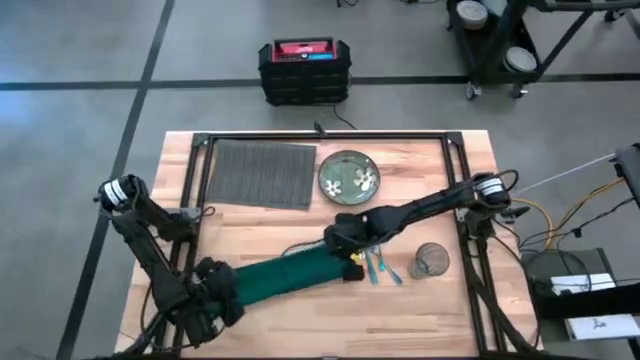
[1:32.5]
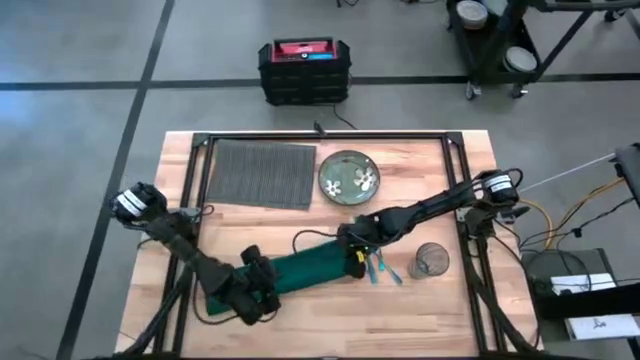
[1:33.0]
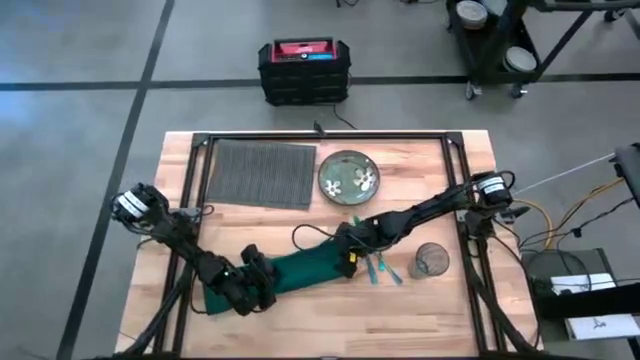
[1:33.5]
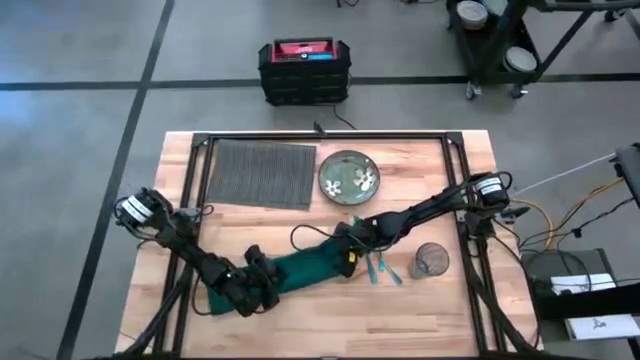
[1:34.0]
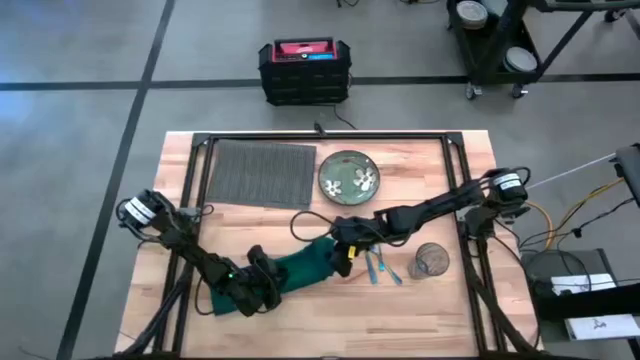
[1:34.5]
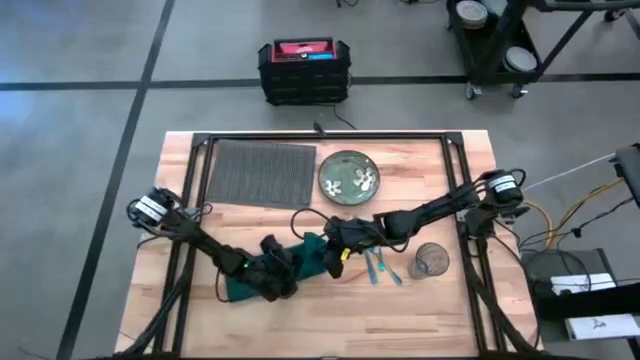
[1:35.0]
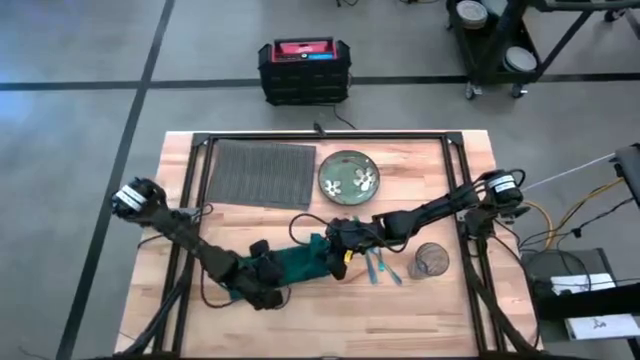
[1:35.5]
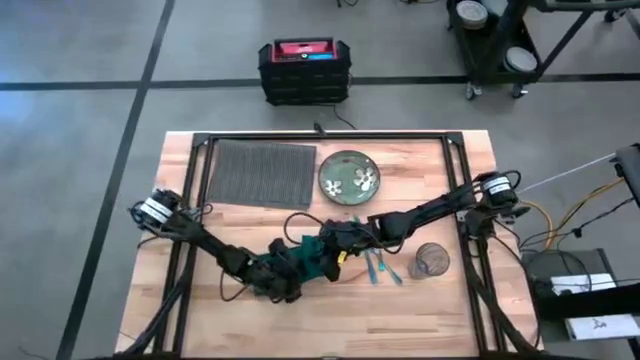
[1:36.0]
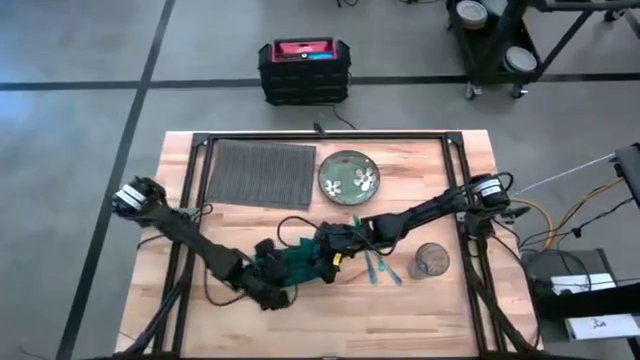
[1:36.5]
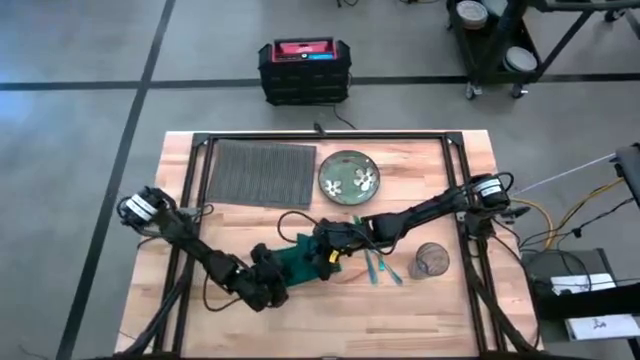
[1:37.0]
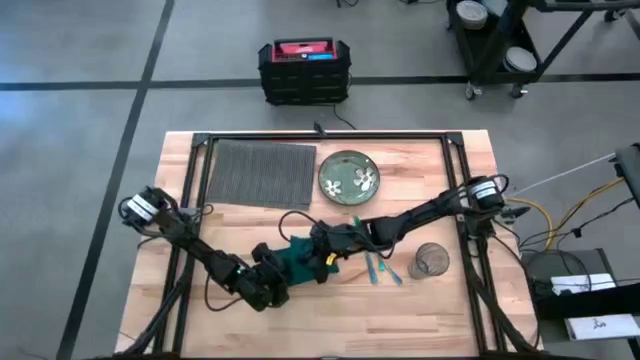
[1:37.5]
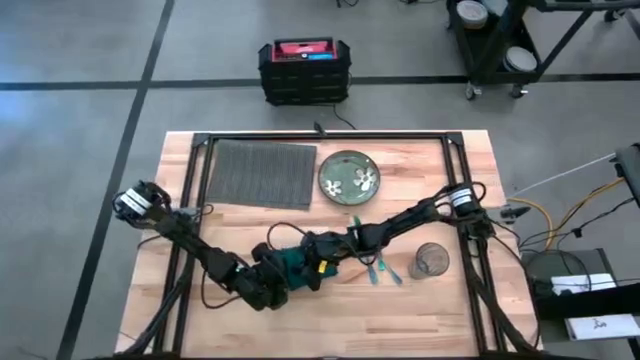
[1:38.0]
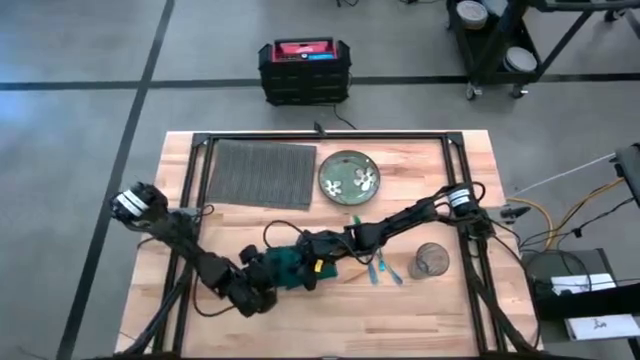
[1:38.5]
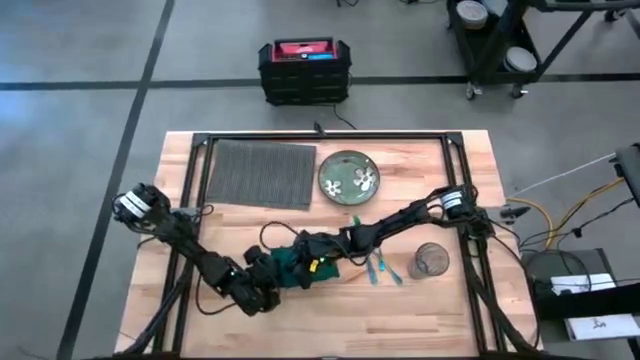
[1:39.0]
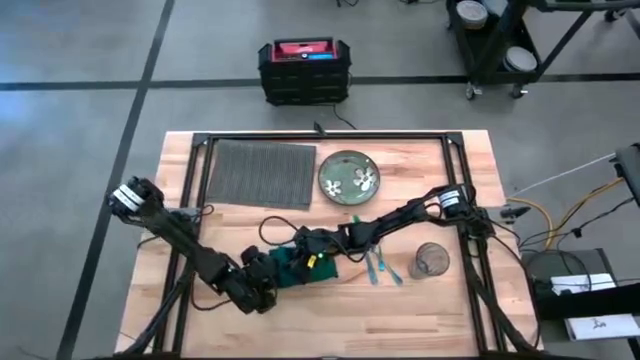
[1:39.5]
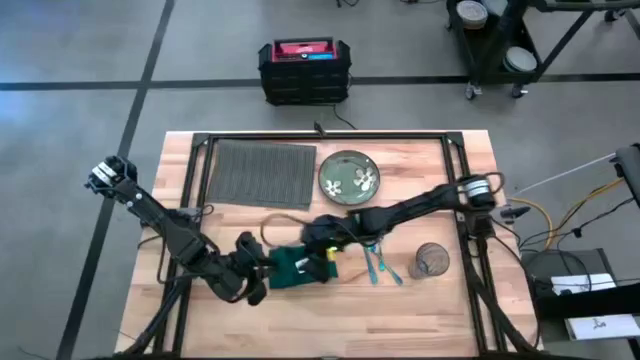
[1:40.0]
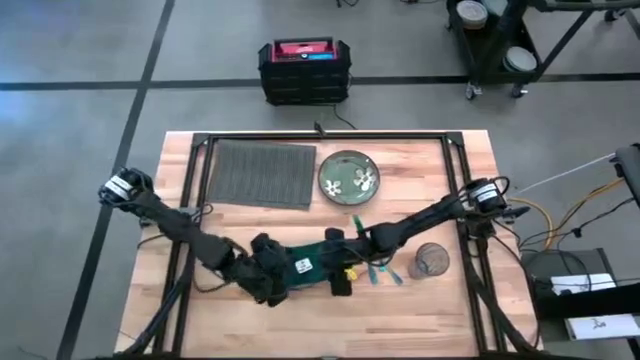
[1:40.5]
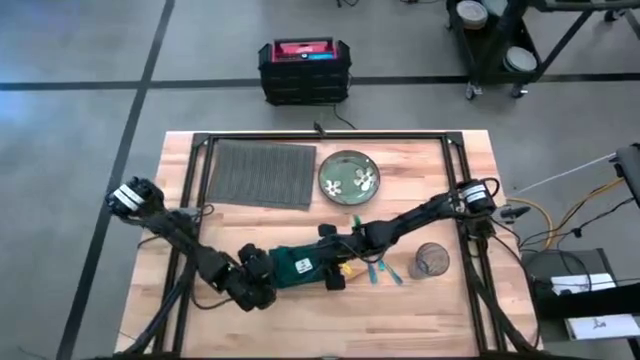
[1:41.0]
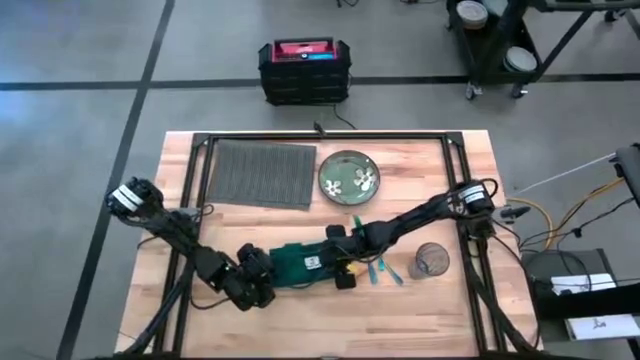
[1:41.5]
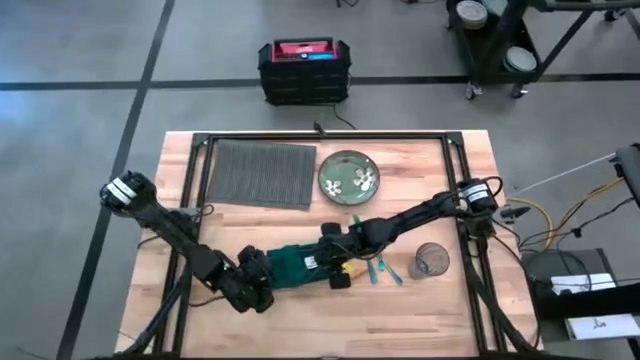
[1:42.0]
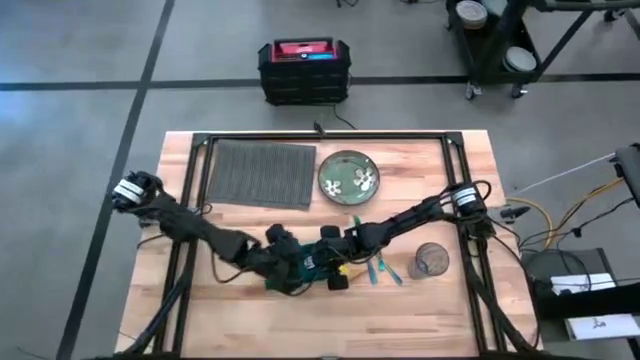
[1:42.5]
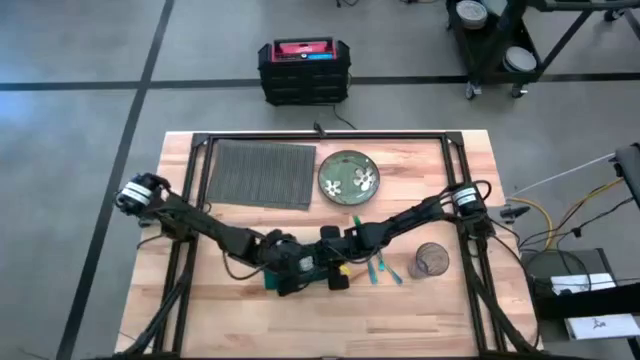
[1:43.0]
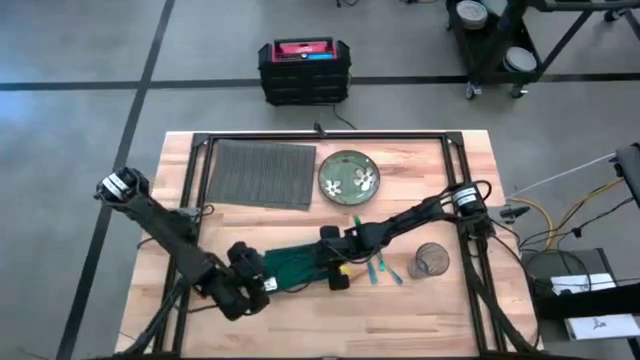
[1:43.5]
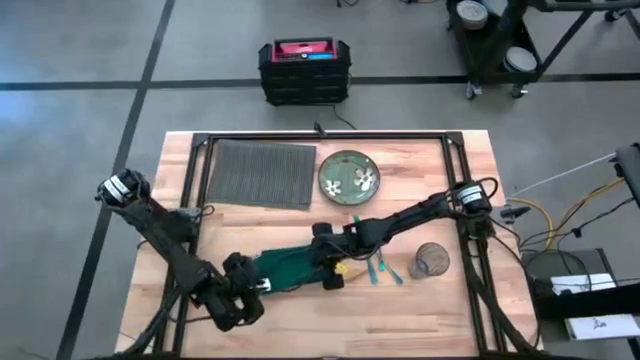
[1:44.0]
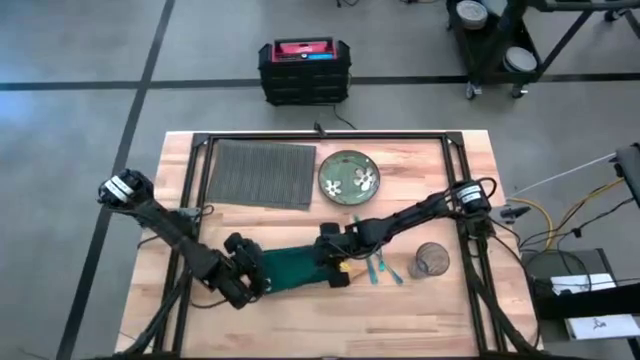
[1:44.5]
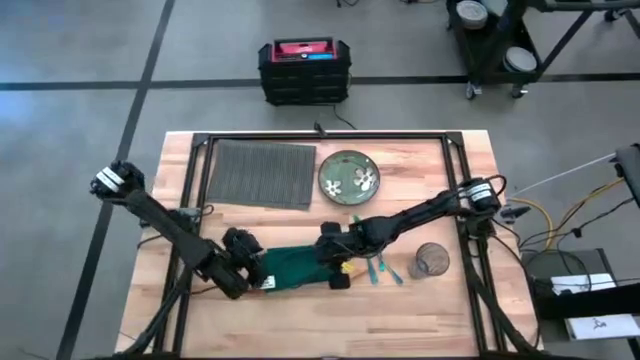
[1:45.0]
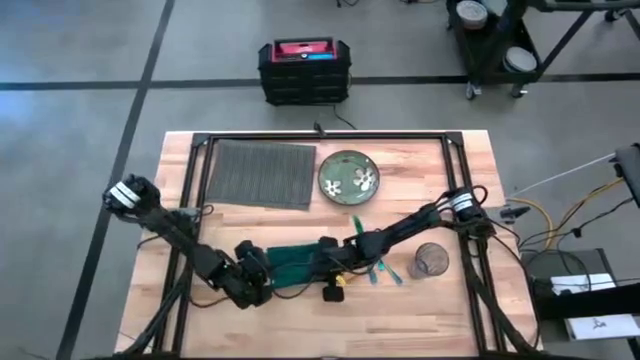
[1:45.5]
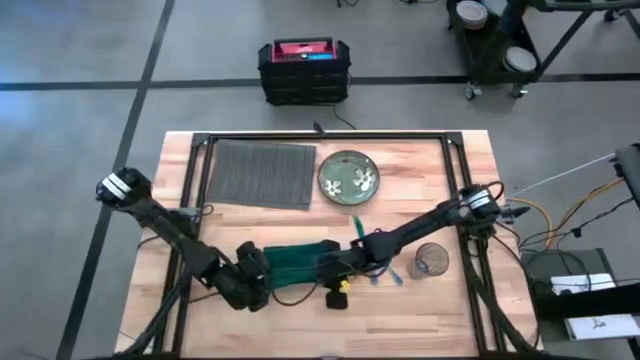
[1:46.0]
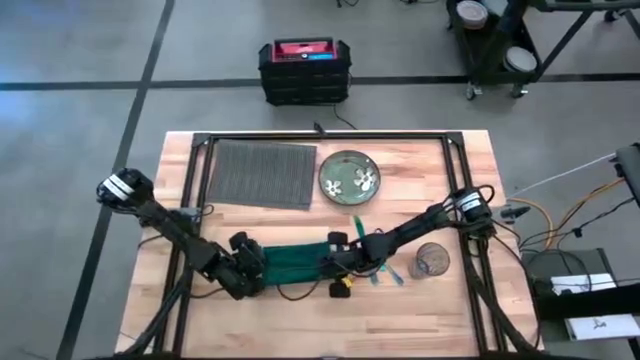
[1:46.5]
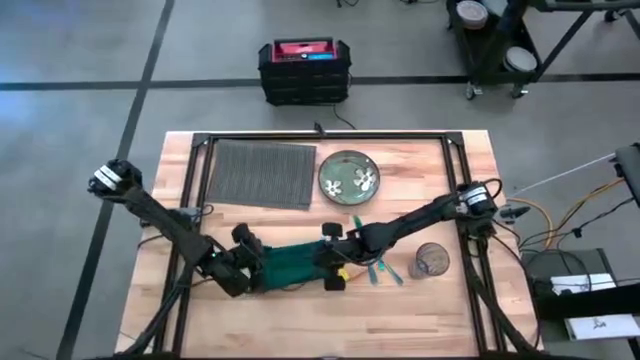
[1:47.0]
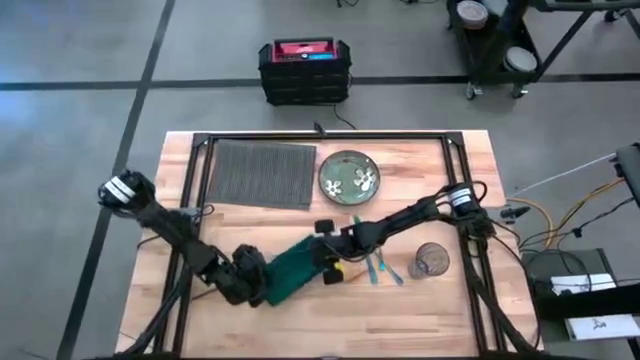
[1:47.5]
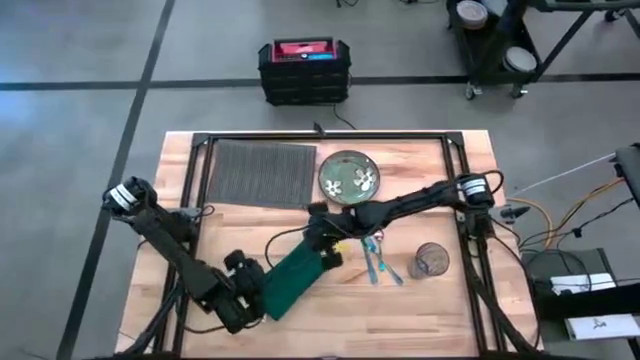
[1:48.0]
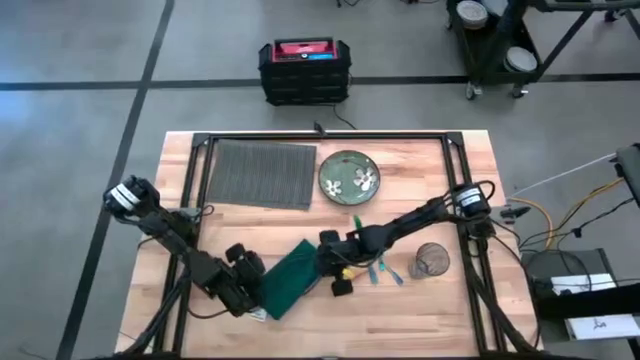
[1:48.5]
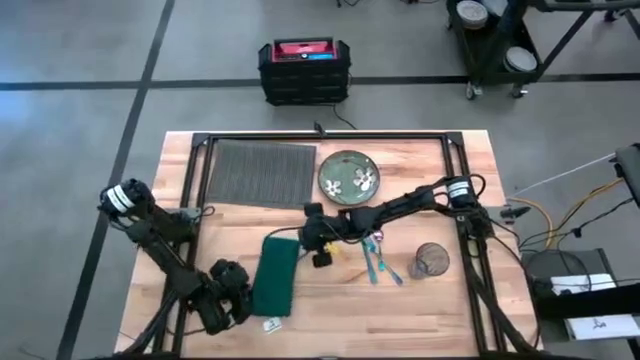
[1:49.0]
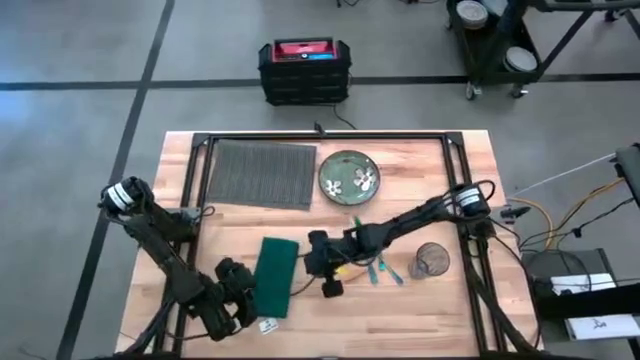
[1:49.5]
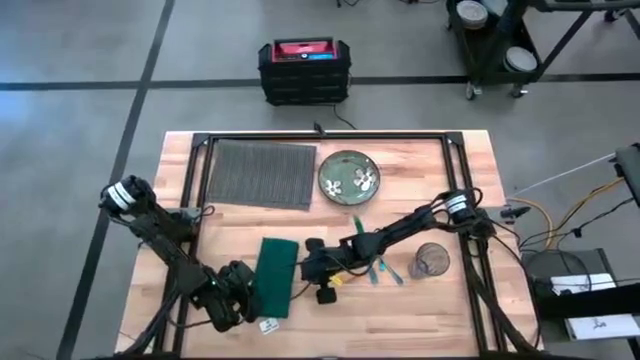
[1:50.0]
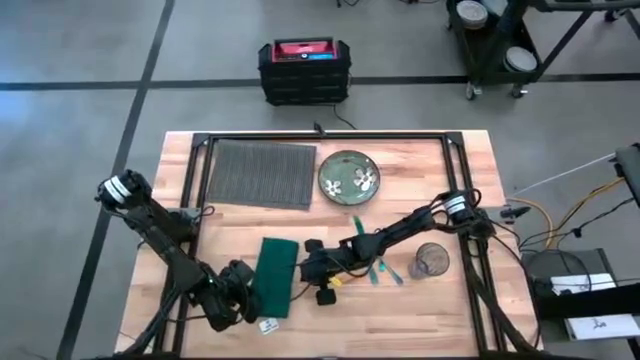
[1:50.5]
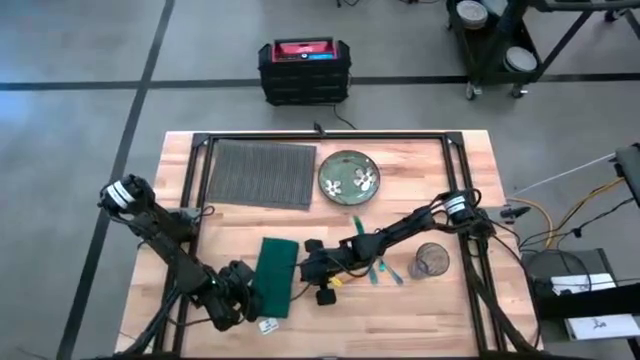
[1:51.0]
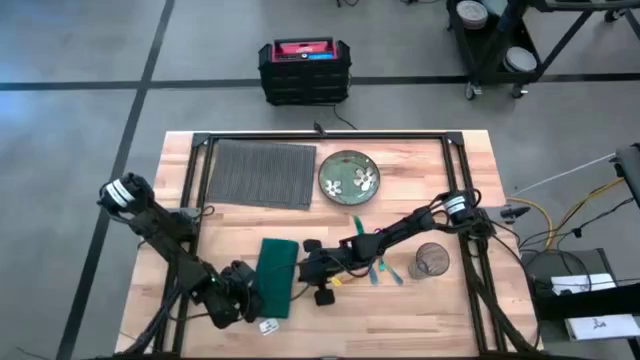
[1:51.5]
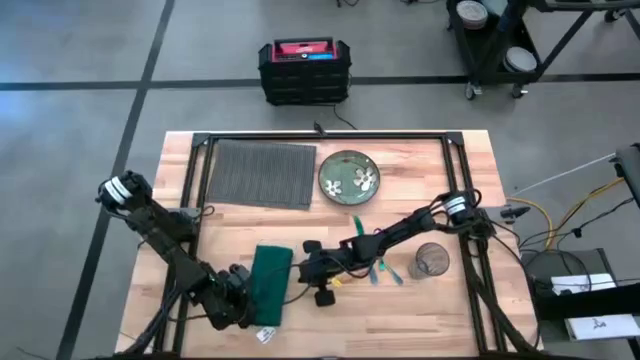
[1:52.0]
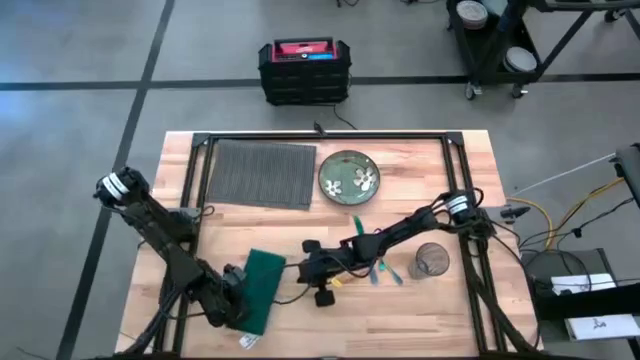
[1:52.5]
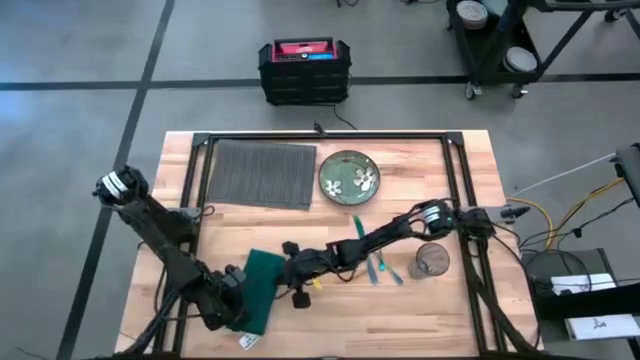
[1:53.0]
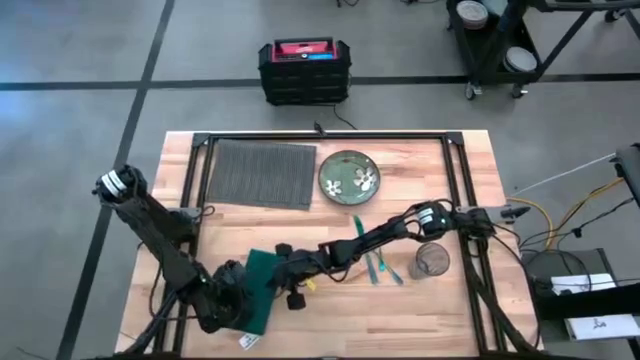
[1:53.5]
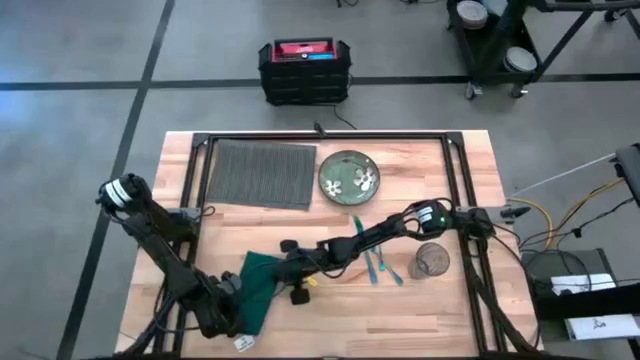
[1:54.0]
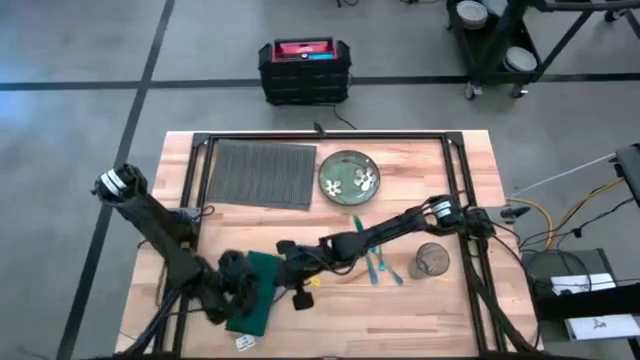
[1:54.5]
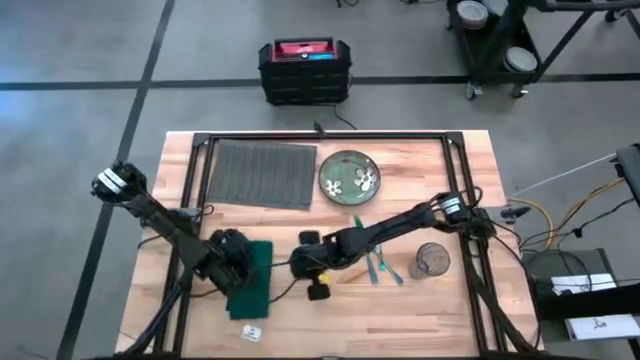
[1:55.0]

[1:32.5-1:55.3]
Task: Set table place
Fold the green napkin
